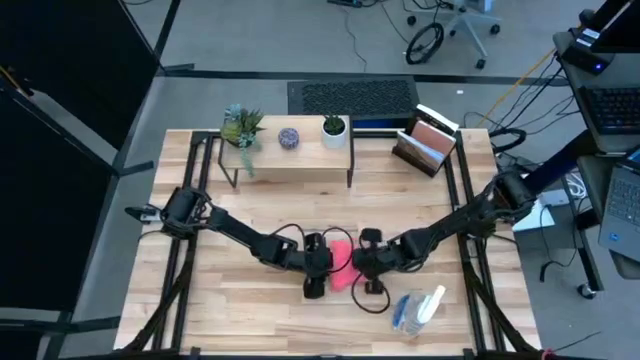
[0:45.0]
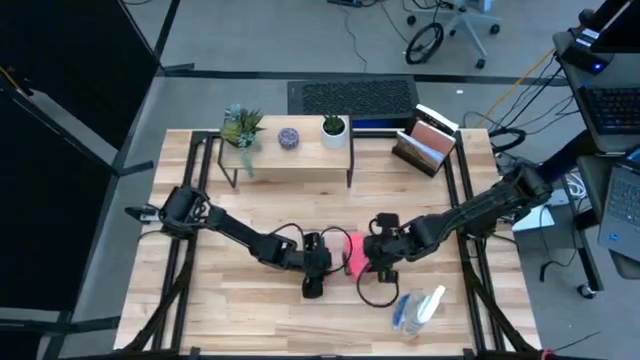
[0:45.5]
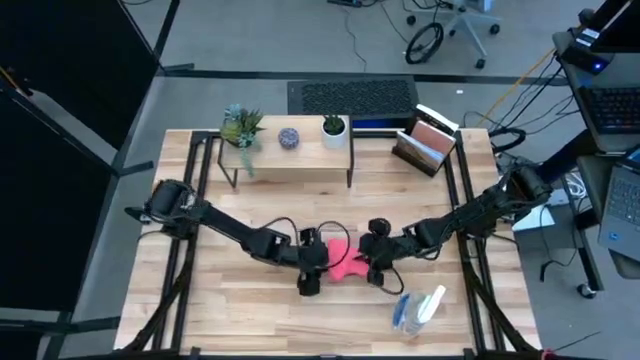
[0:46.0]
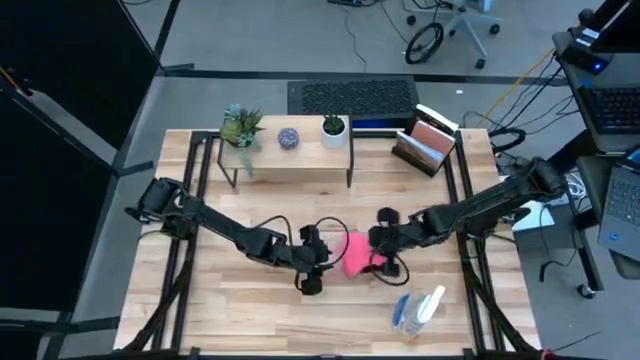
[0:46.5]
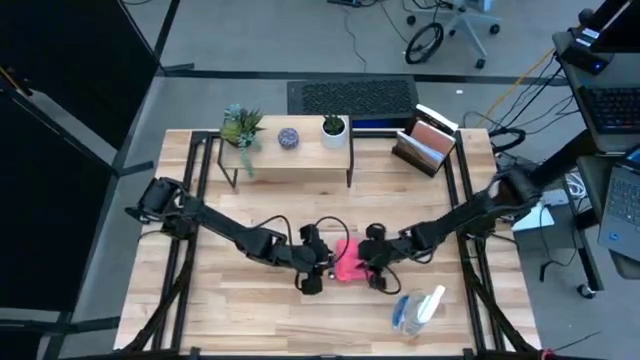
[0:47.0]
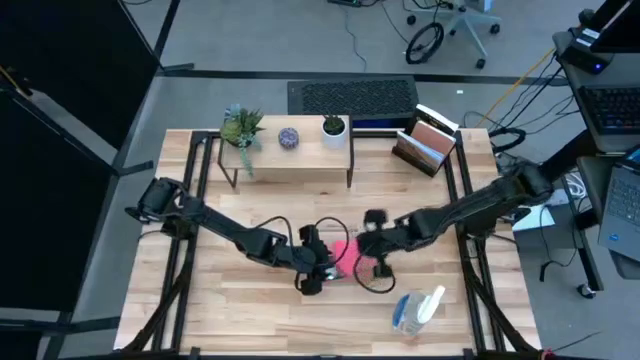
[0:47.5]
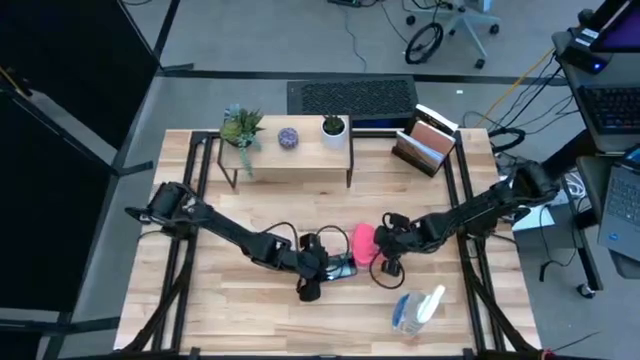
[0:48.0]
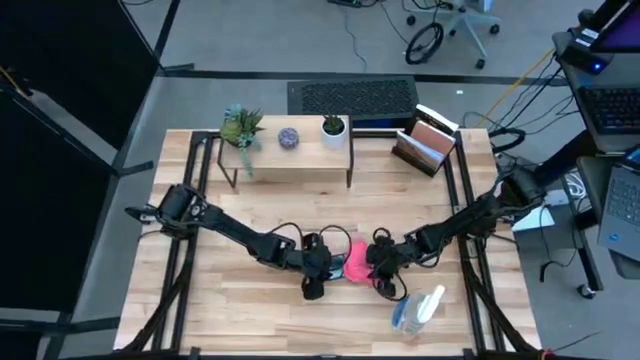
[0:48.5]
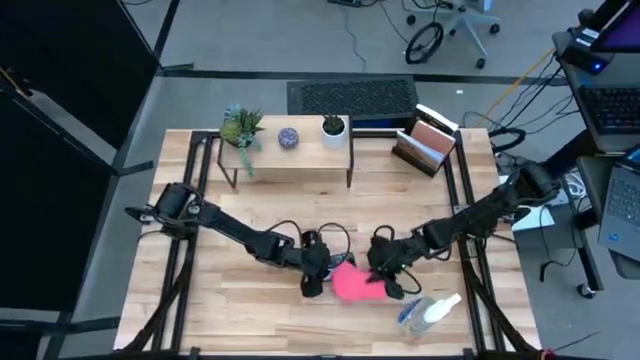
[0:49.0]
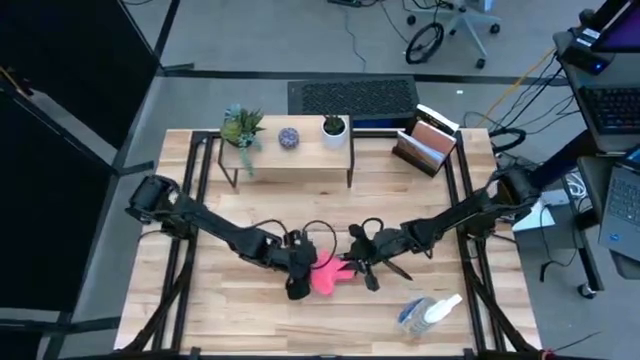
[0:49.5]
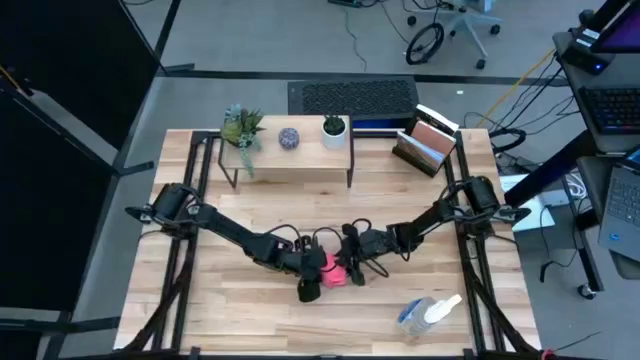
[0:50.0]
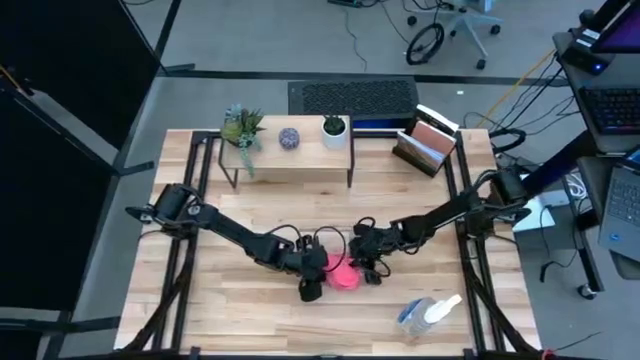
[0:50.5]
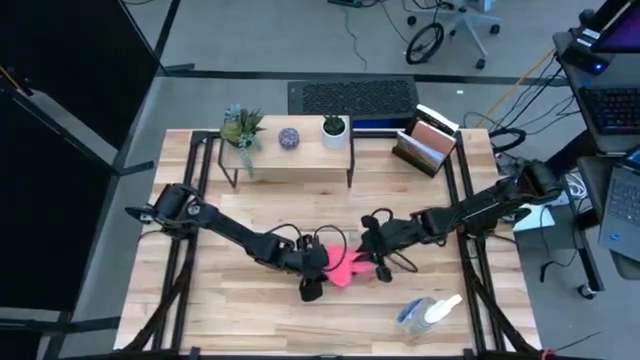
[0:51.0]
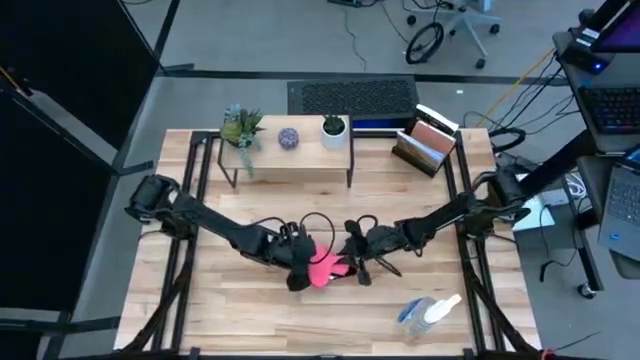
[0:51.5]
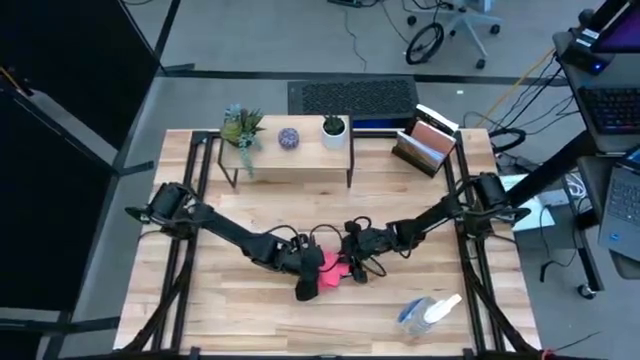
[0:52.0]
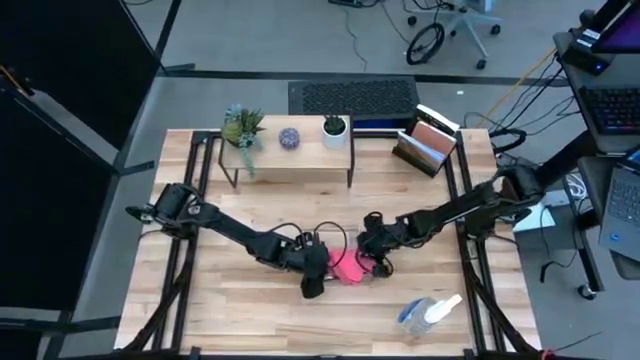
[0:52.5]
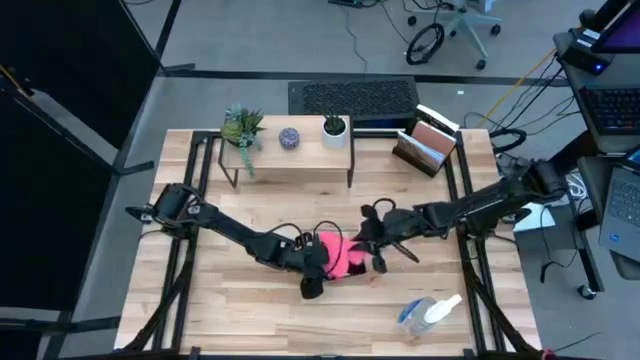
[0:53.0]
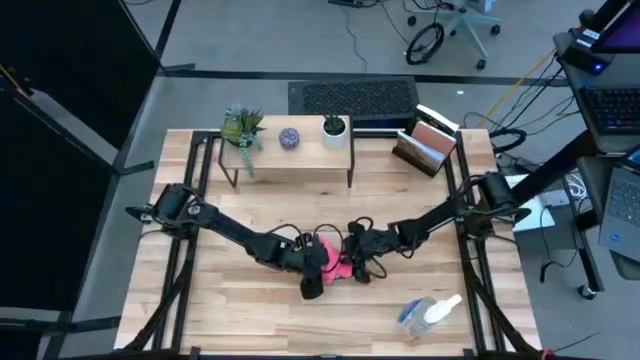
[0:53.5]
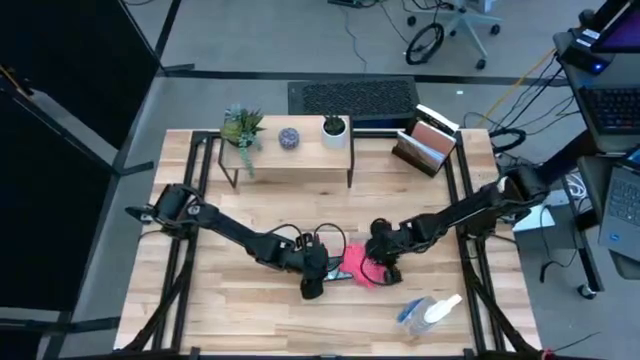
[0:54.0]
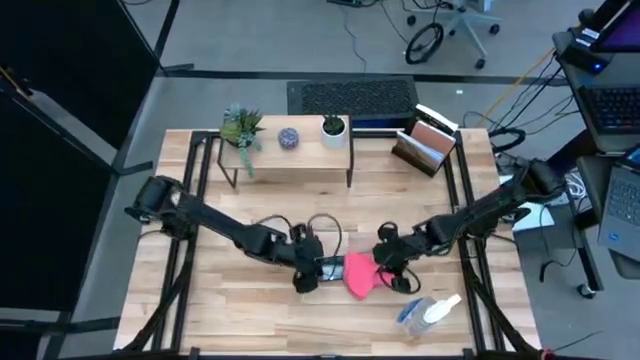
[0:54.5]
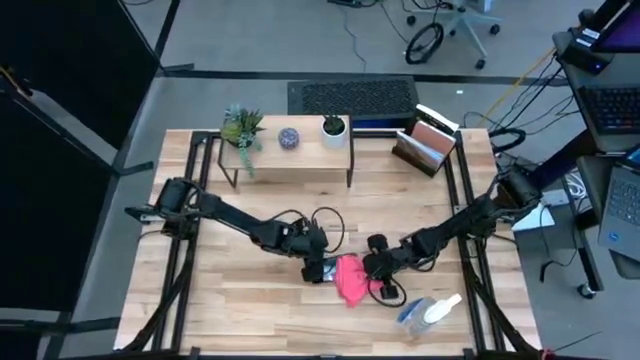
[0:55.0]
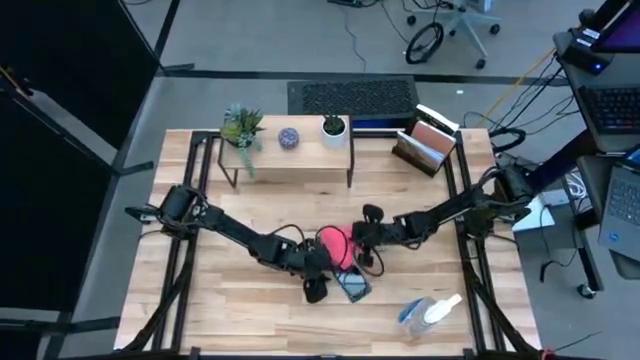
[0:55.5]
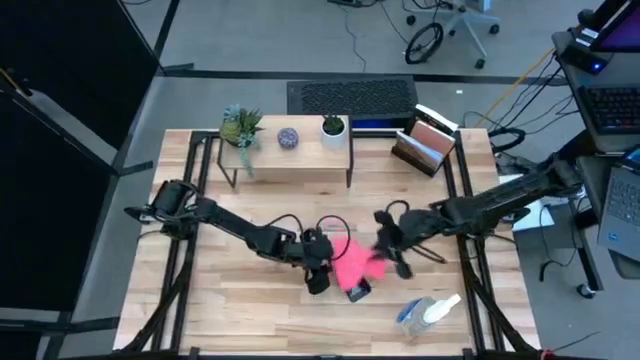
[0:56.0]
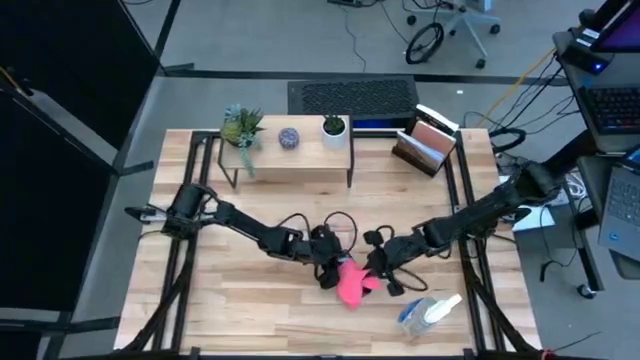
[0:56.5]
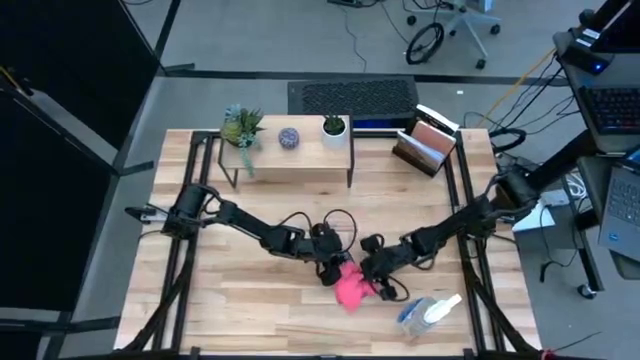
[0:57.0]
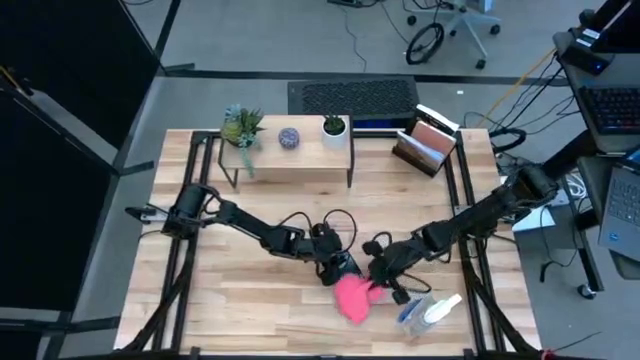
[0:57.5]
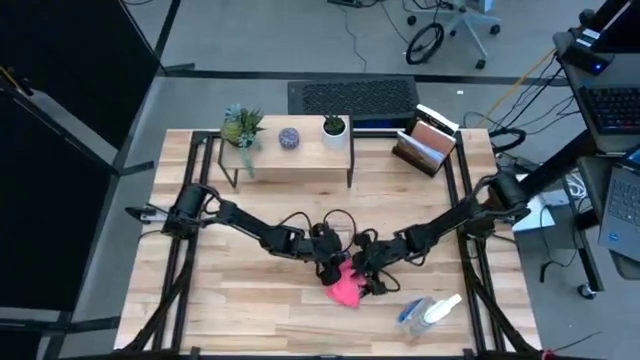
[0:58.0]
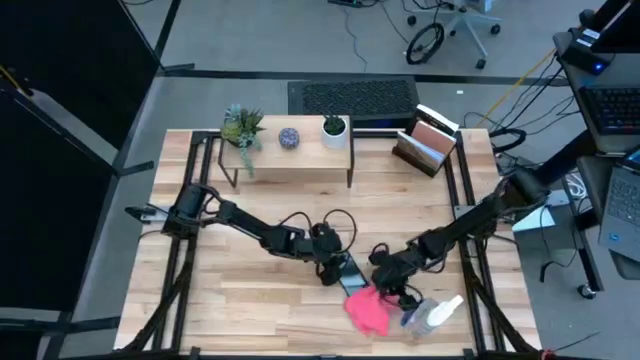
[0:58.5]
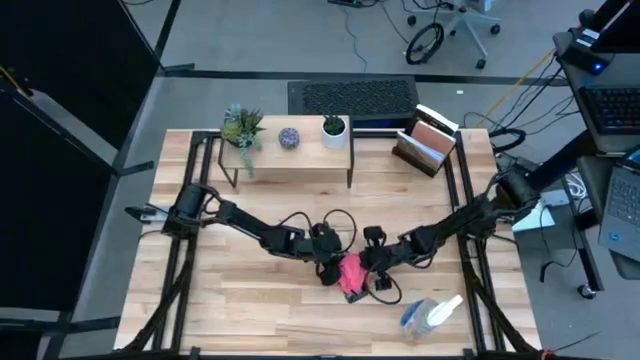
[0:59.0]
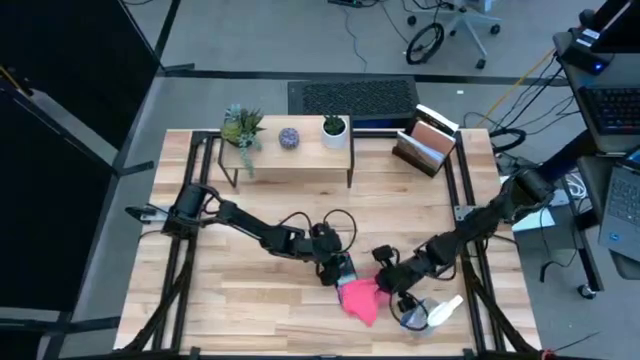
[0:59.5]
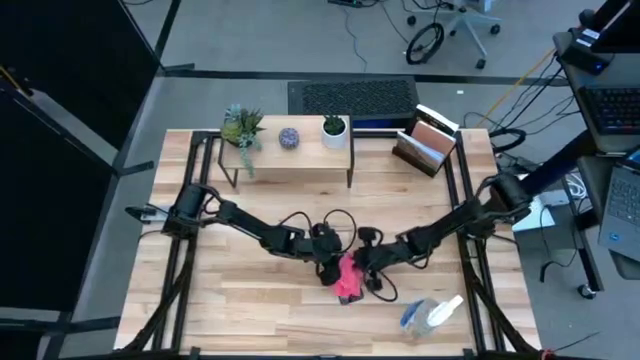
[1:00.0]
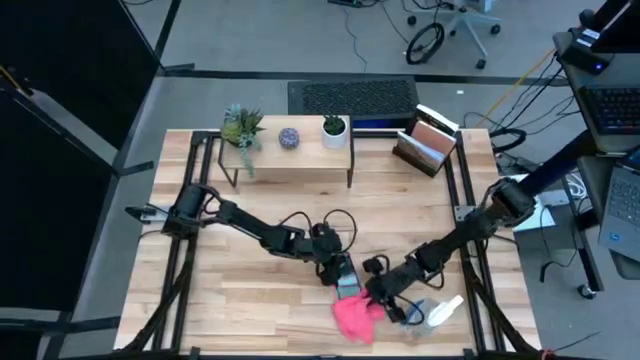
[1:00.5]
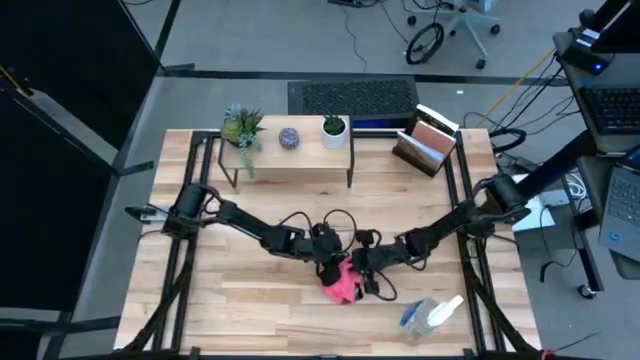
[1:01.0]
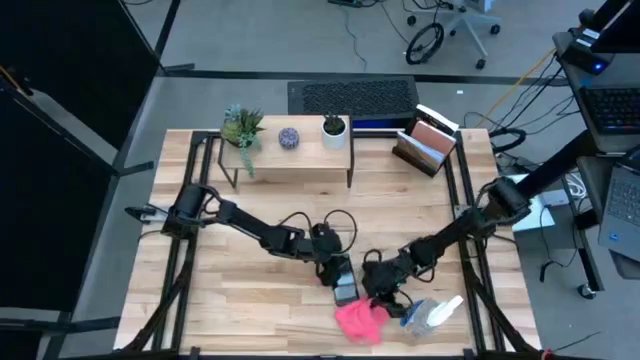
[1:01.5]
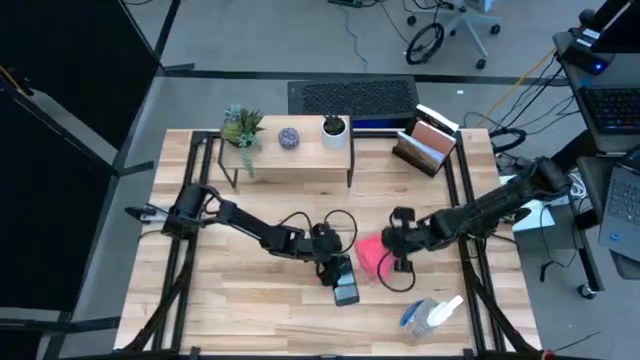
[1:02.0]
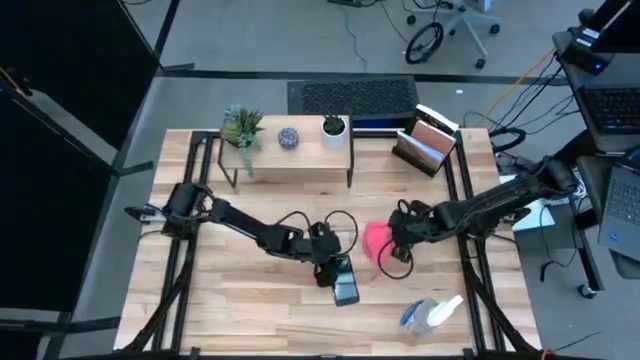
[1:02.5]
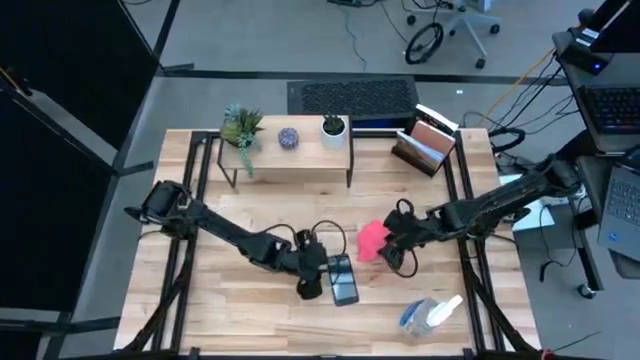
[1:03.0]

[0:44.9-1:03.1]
Task: Apply microfiber cloth
Wipe the front of the cellphone using the pink microfiber cloth

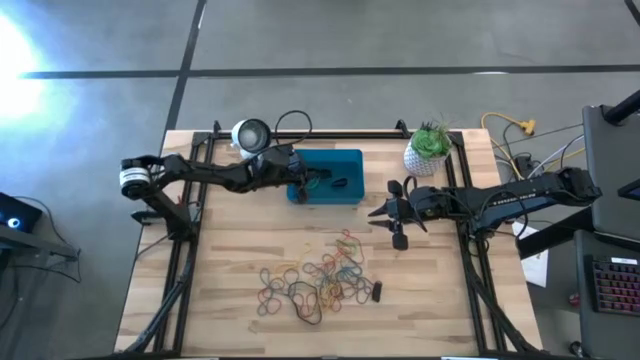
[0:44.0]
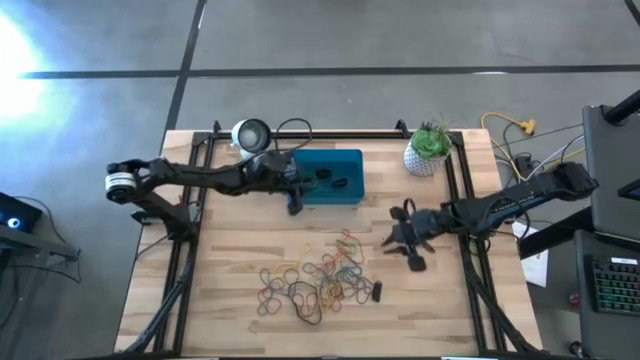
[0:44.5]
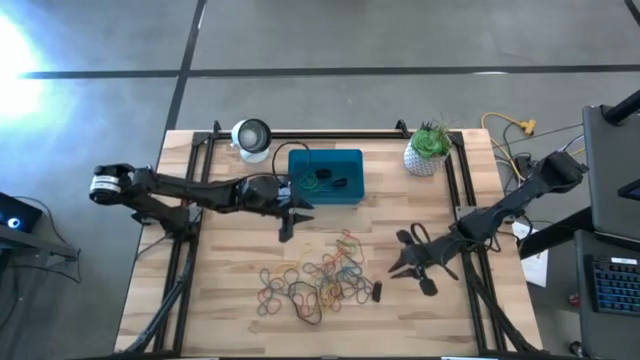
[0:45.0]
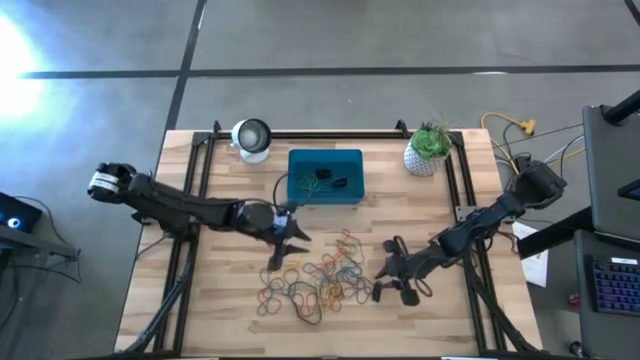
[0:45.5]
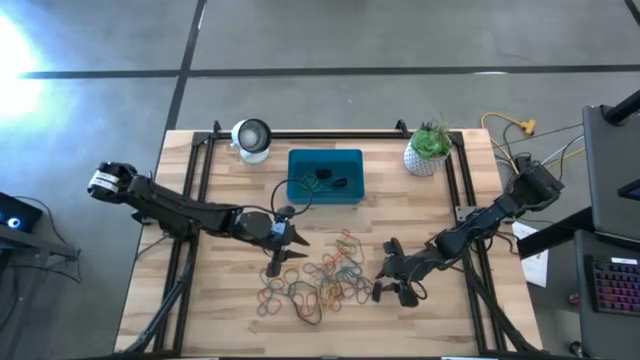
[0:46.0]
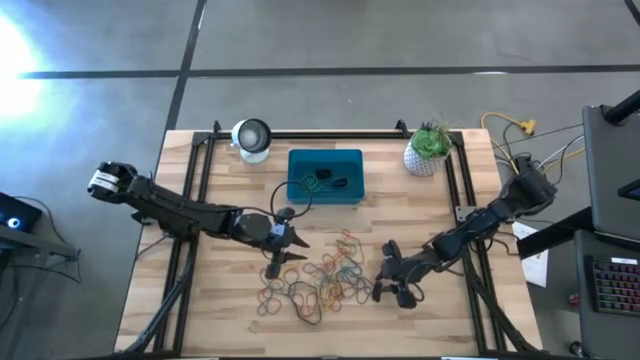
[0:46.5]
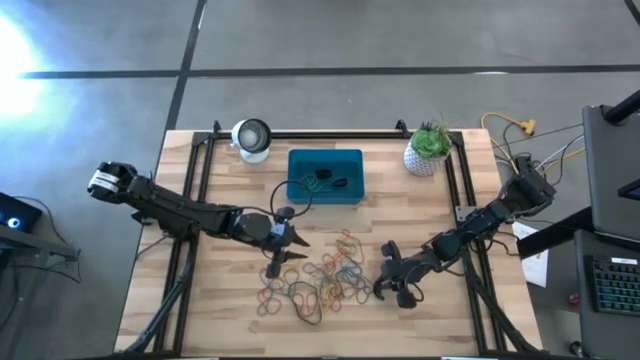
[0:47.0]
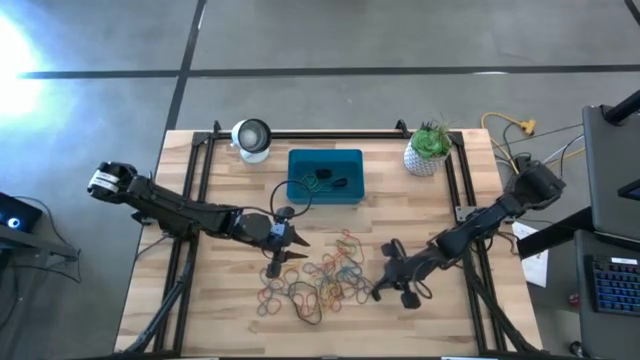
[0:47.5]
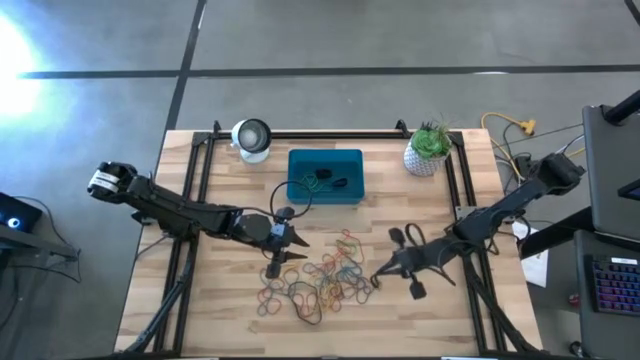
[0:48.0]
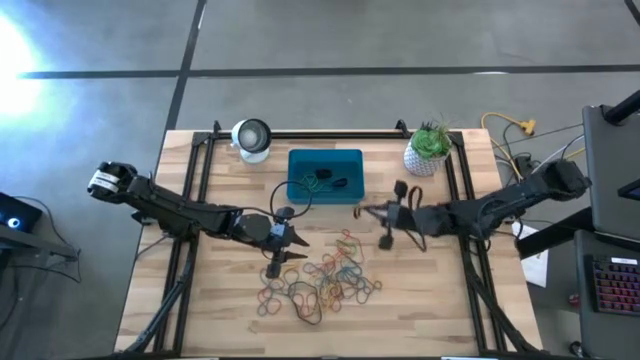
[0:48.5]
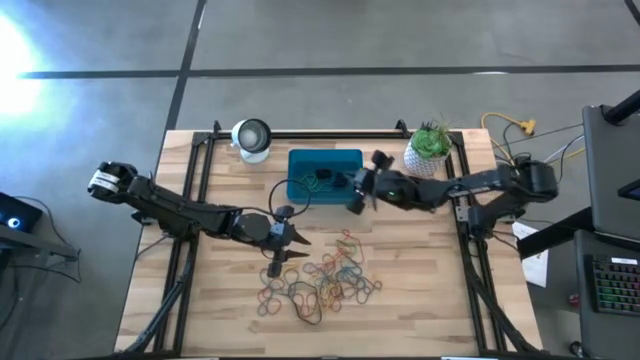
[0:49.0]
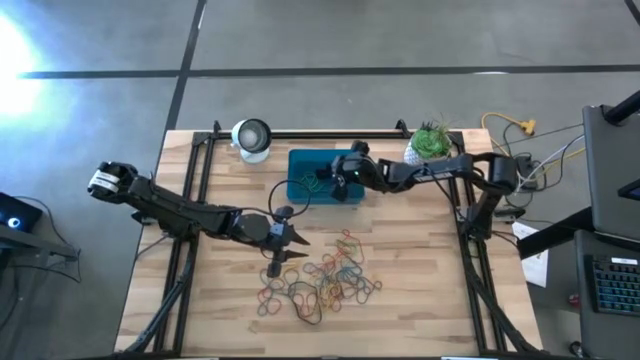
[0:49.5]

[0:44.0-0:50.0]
Task: Pick and place rubber bands into bin
Put the black rubber band into the bin
